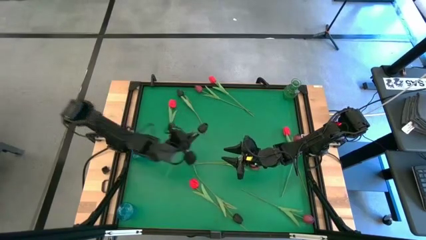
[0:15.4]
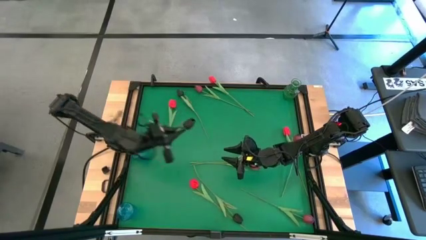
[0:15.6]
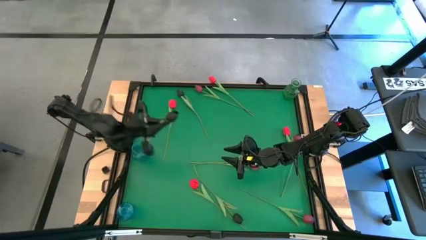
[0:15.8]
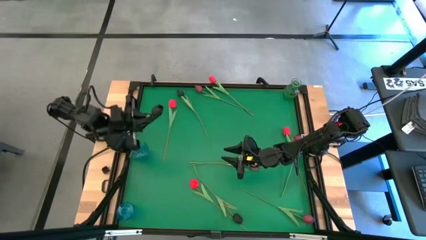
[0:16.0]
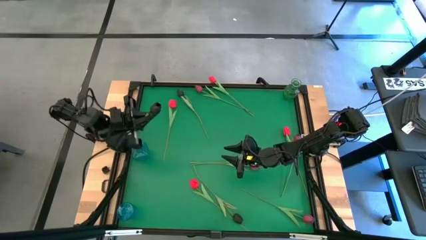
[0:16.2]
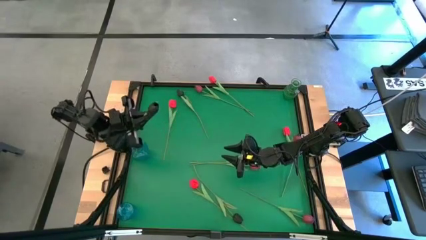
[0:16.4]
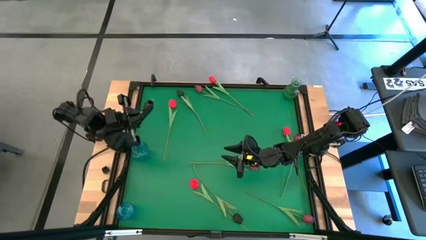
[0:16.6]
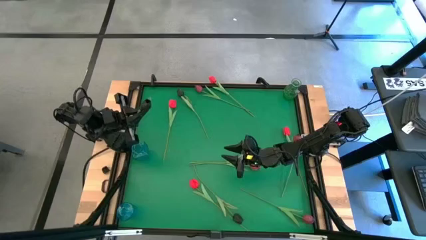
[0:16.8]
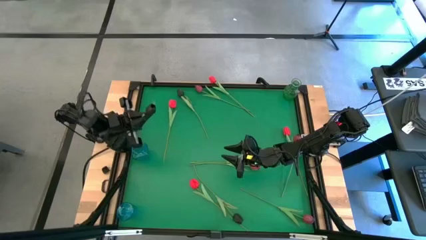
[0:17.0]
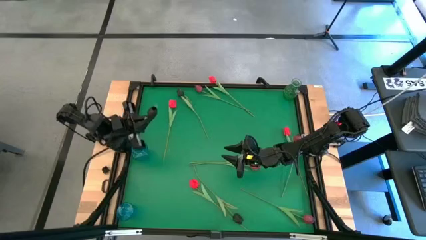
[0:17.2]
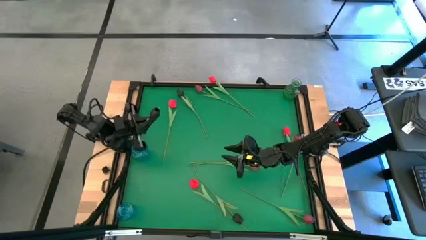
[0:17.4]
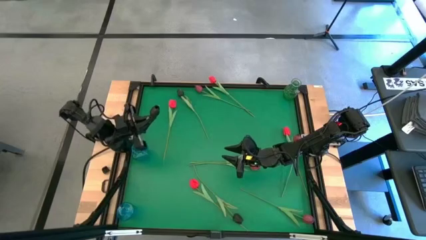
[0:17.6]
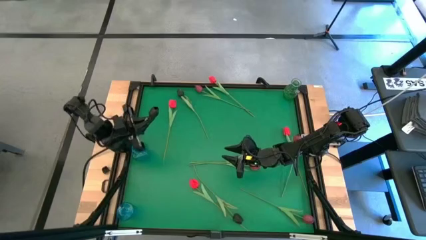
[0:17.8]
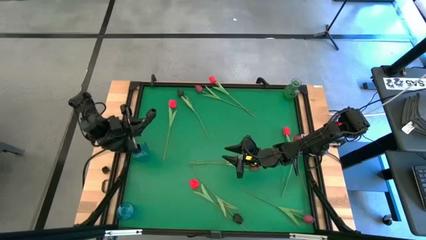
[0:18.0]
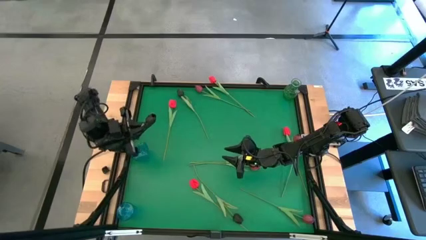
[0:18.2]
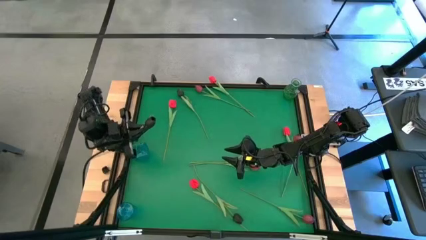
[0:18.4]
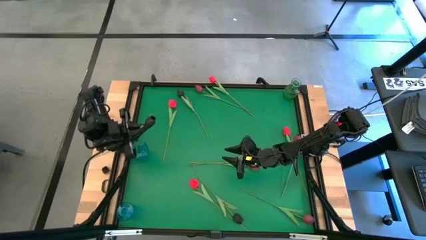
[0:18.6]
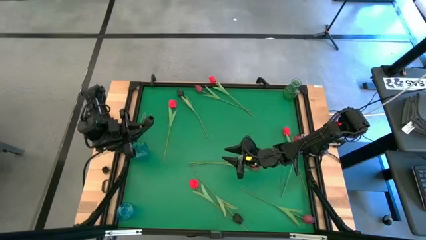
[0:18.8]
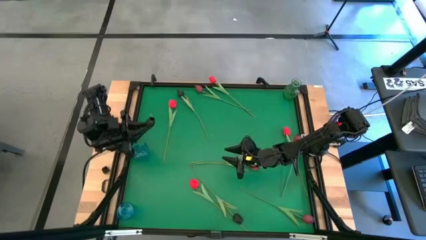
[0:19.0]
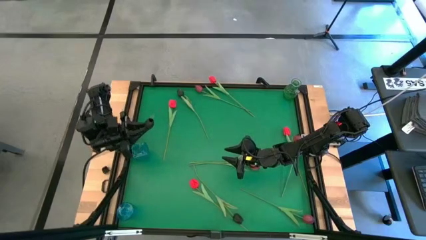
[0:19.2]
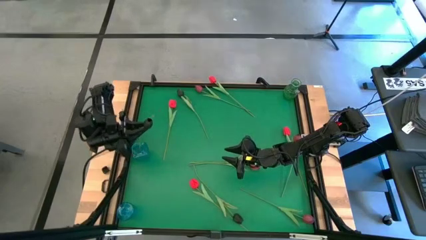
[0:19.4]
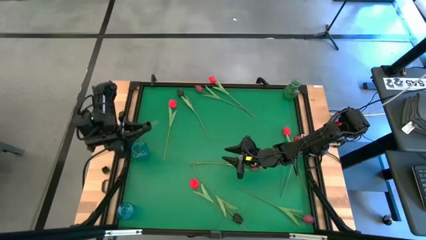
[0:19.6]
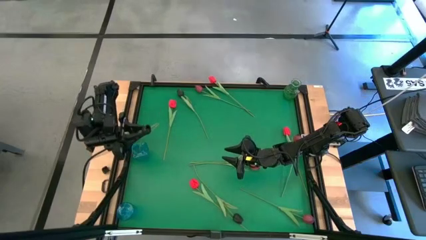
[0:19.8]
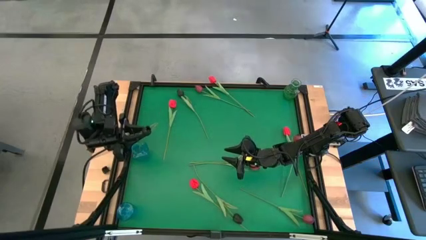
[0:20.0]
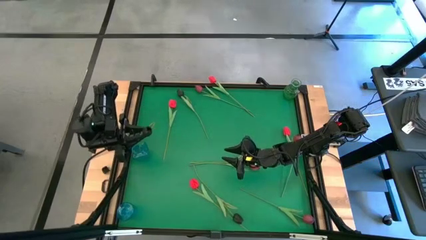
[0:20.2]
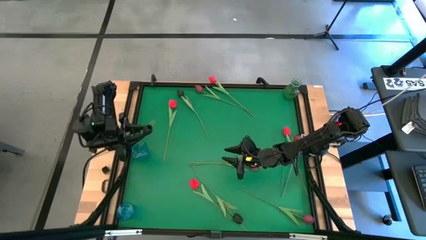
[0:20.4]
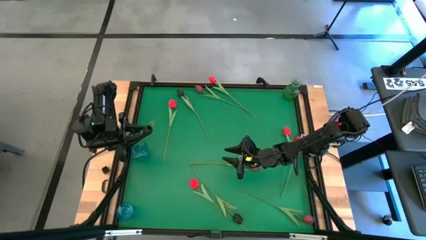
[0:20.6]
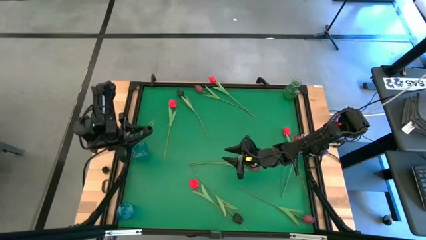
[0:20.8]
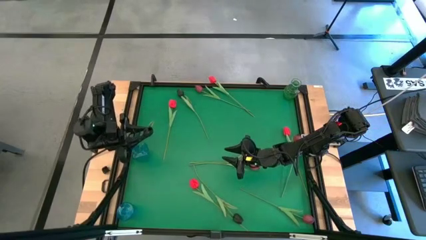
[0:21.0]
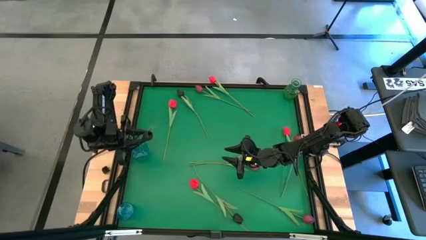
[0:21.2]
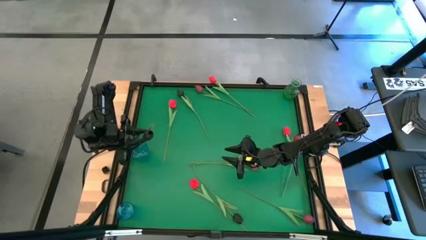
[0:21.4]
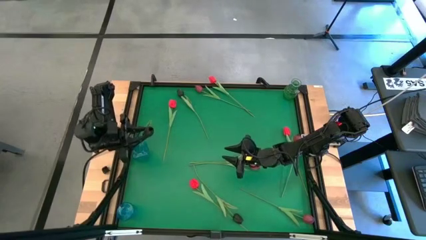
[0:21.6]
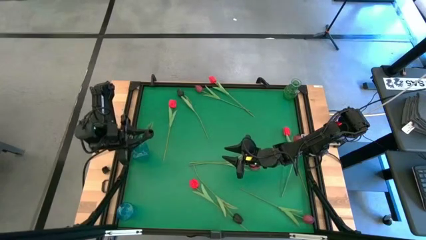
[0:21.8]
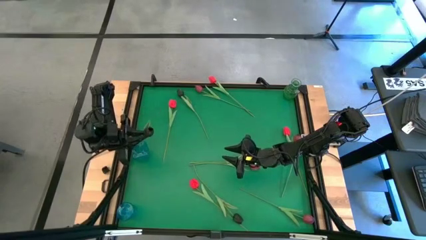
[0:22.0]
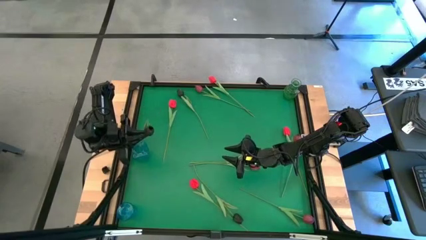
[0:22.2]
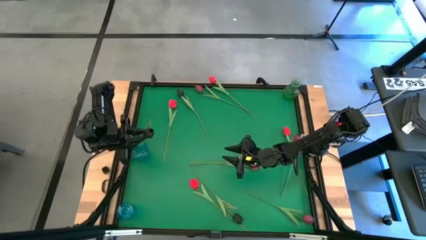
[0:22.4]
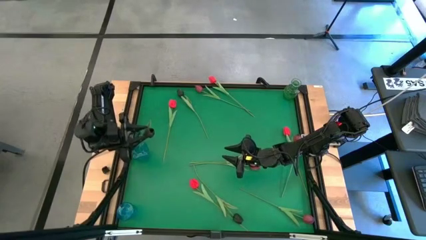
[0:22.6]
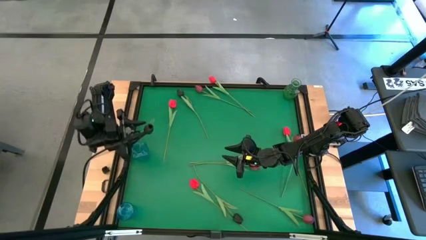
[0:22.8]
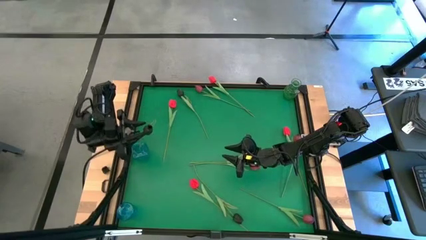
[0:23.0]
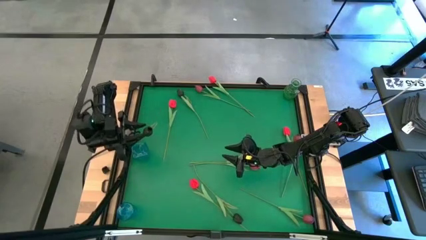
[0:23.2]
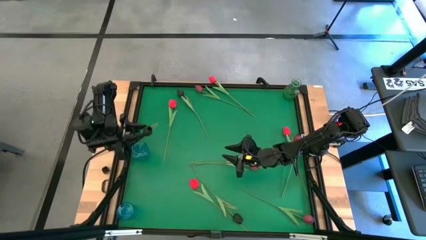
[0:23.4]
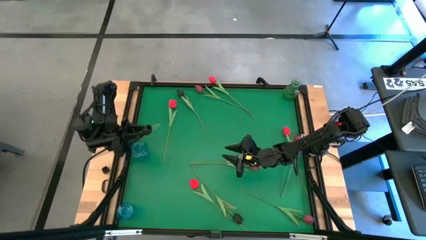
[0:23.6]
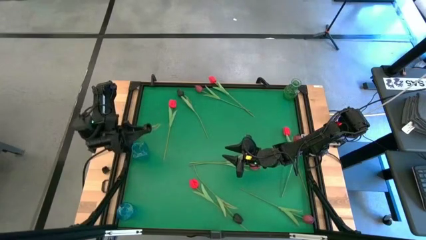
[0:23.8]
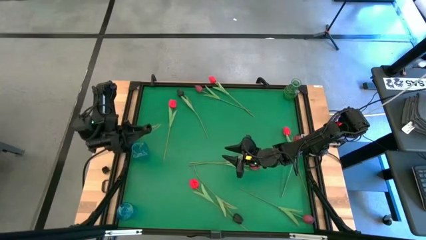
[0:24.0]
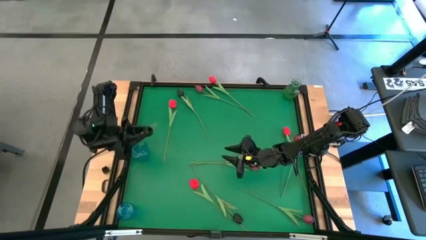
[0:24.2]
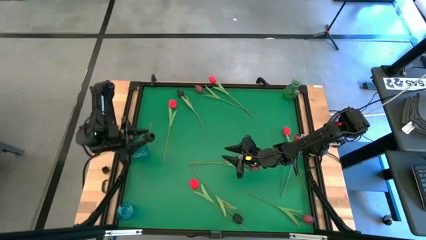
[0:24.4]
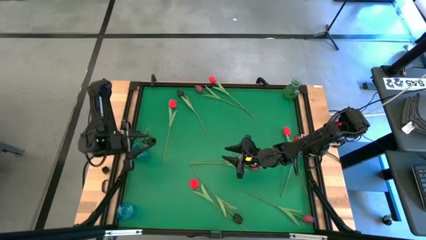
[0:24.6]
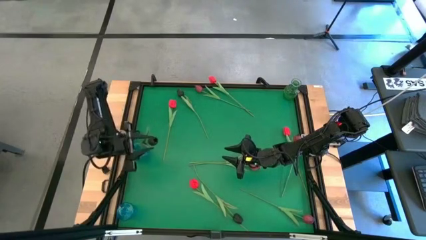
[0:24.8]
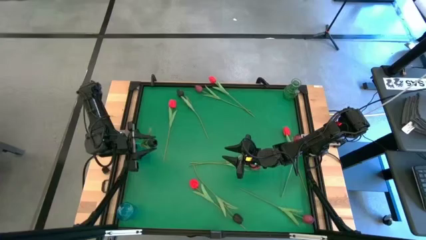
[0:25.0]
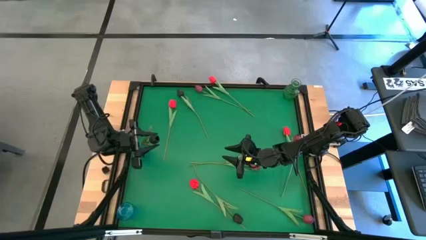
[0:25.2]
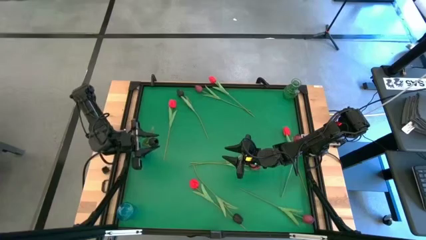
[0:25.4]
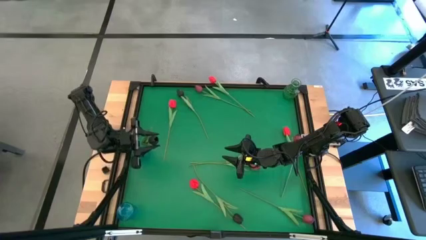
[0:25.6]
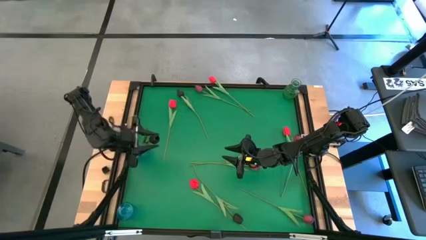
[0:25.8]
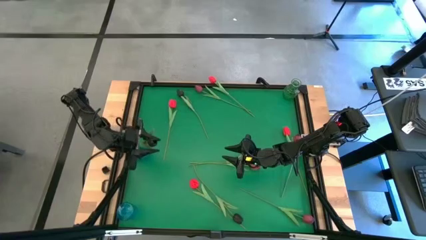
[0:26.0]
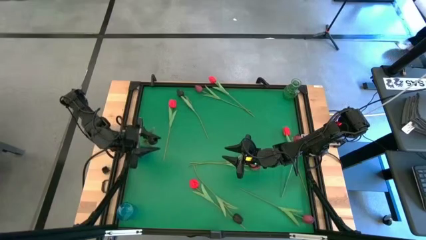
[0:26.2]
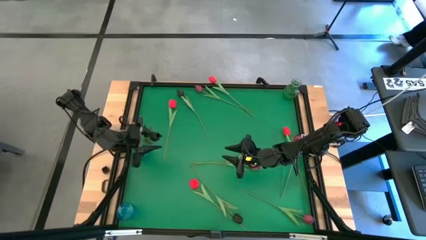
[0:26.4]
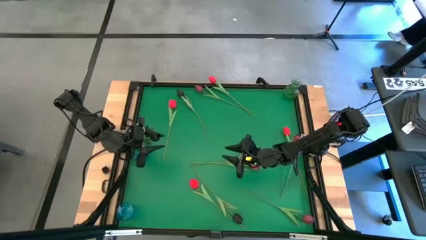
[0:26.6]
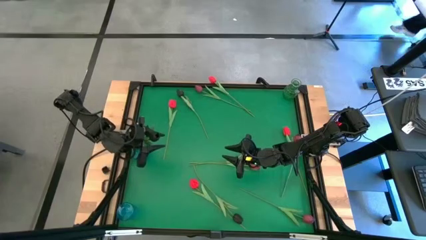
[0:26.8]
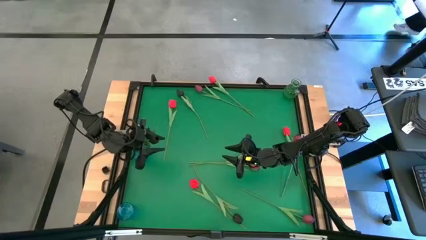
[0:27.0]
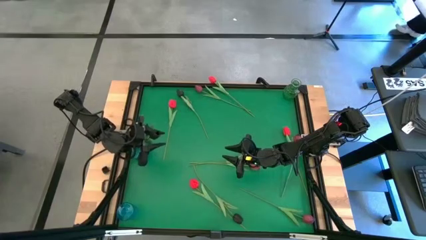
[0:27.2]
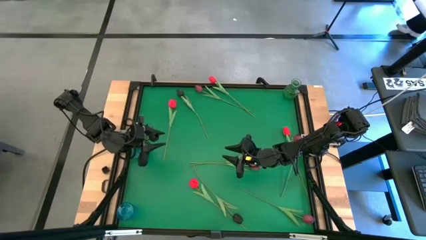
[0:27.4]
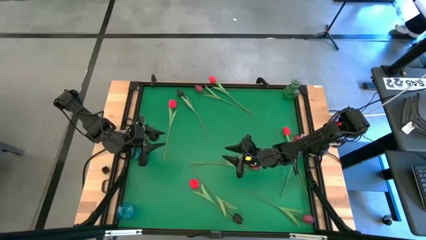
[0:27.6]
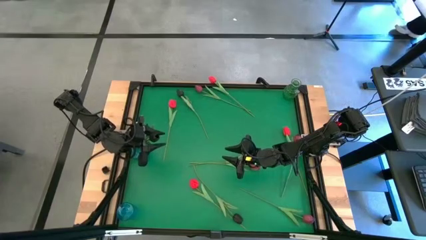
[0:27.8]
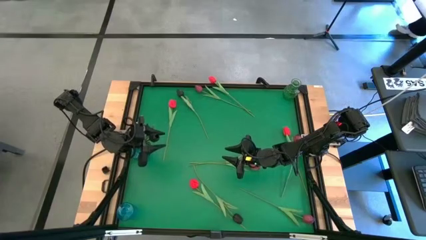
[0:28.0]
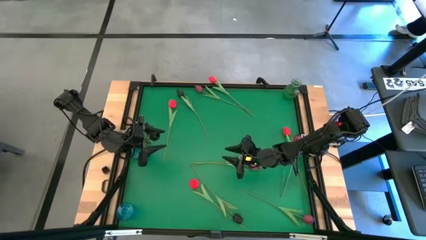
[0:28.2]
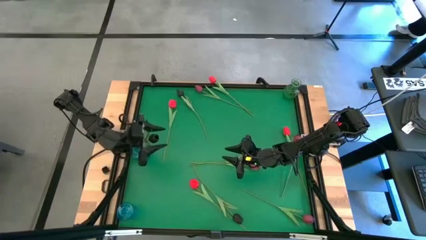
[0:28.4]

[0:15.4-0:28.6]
Task: Sort flowers into vase by color
Put the black tulip into the top blue vase
